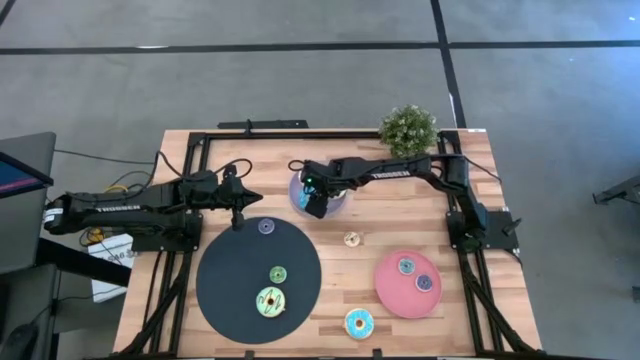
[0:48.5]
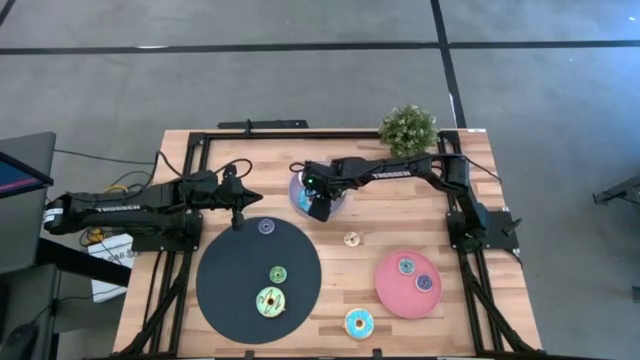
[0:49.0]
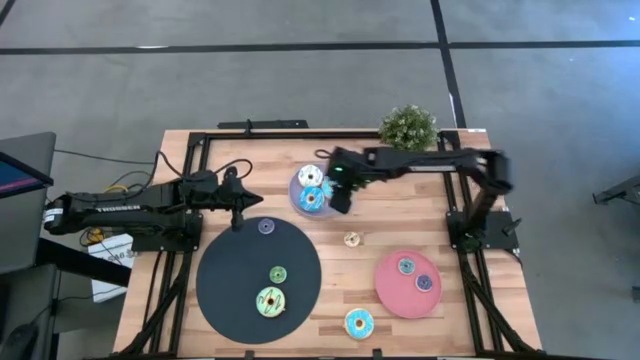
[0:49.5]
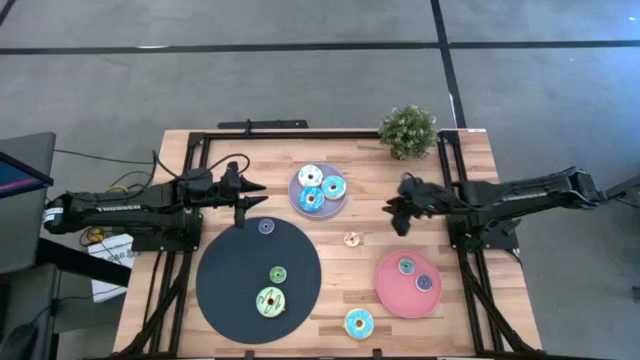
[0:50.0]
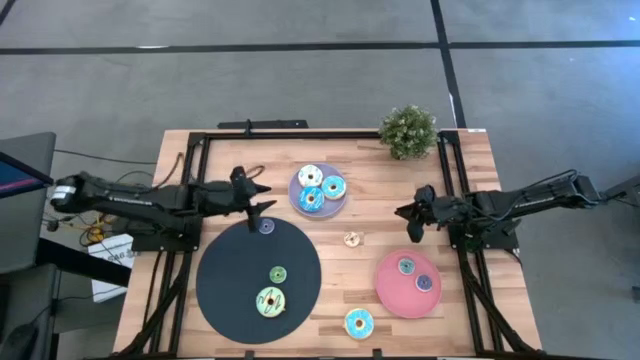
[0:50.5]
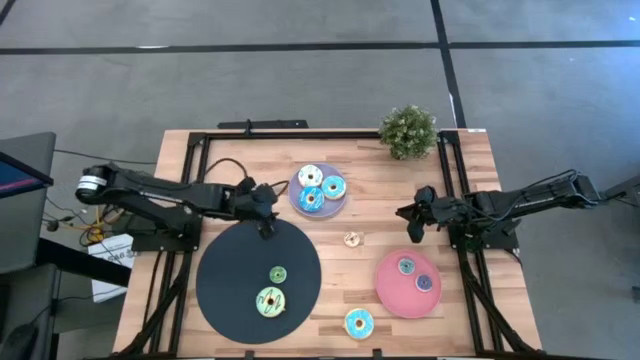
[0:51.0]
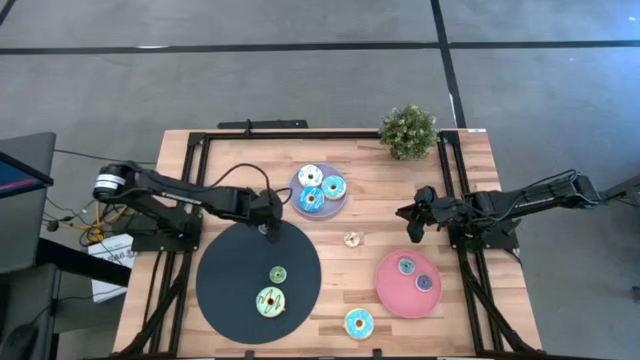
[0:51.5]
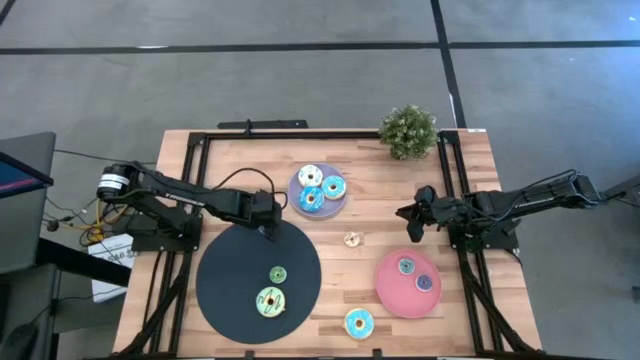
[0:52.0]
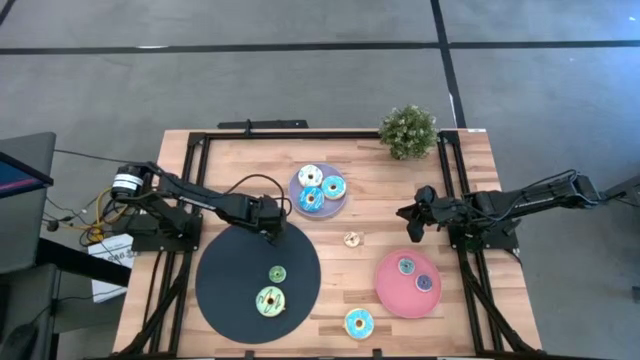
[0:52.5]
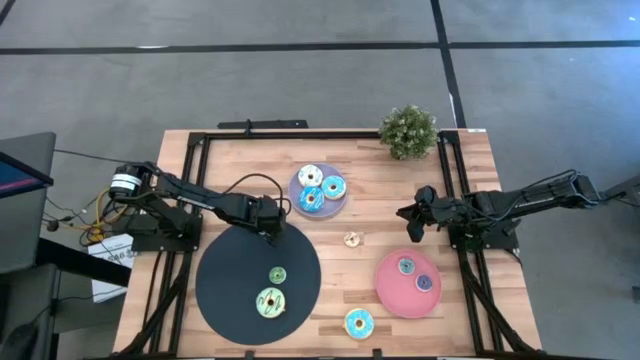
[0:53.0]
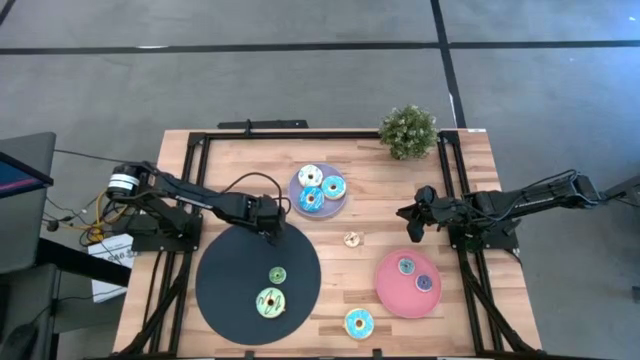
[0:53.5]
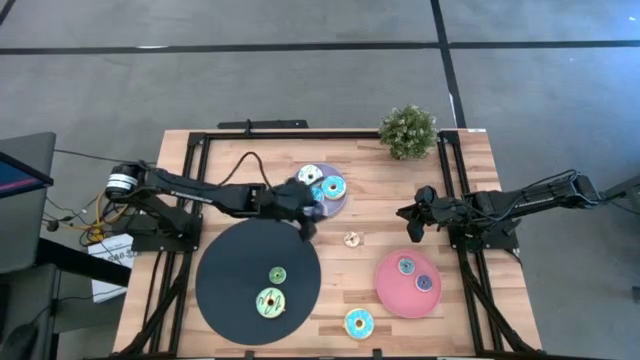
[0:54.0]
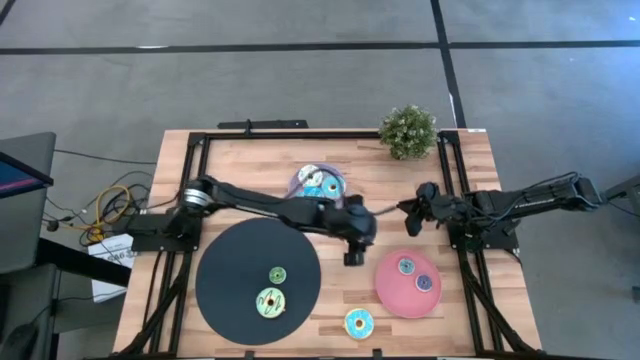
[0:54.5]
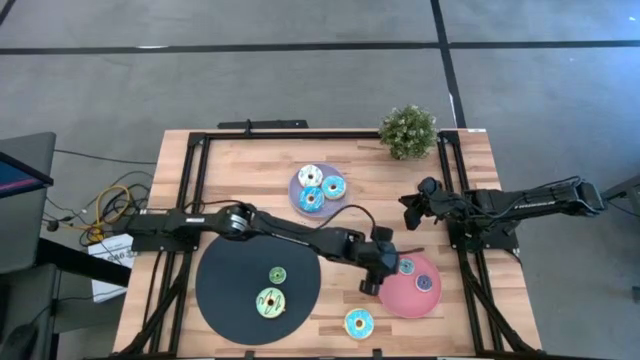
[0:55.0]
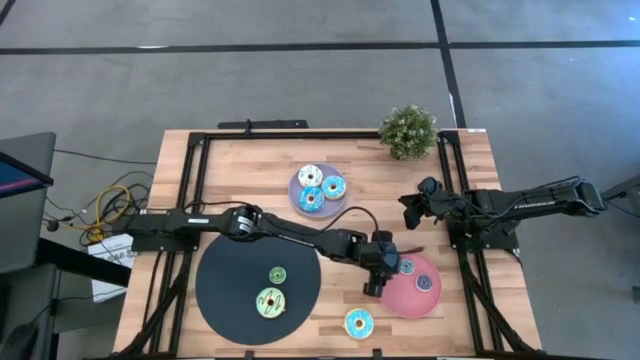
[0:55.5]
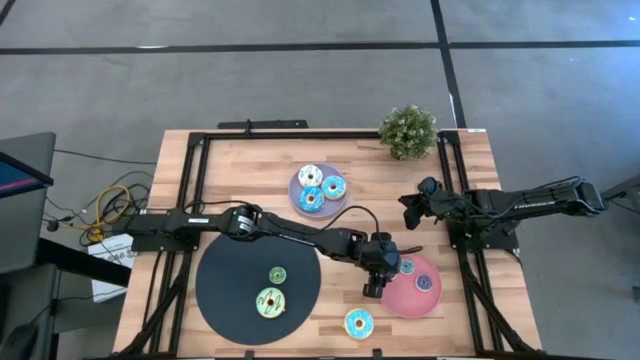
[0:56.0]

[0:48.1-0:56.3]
Task: Pick & Place donuts
Put the small blue donut on the pink plate

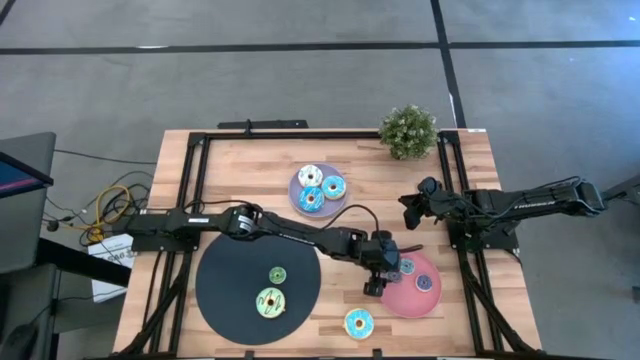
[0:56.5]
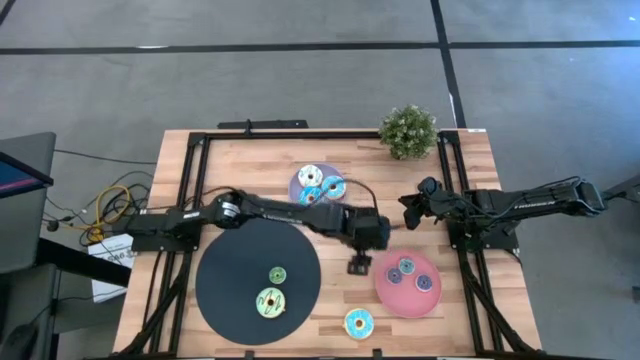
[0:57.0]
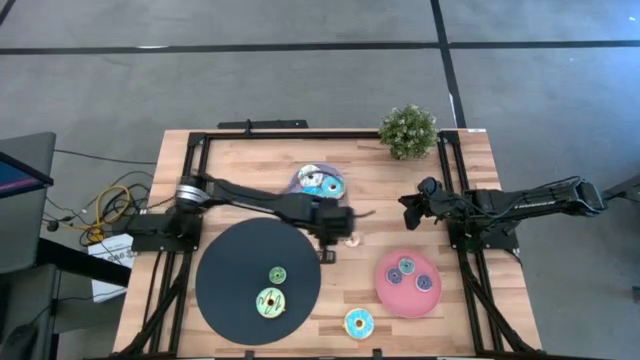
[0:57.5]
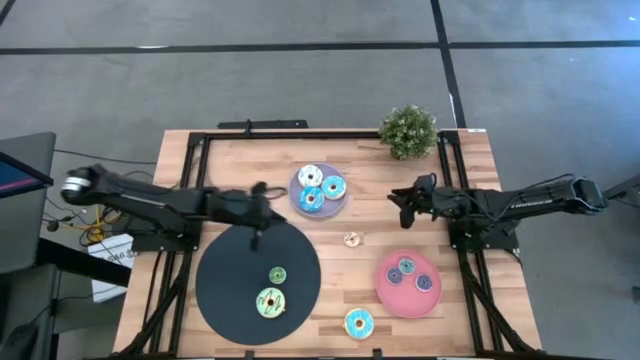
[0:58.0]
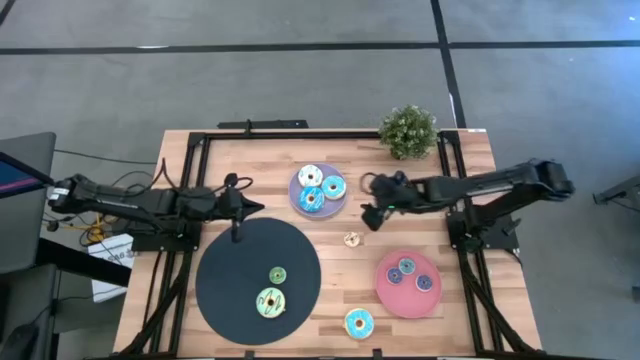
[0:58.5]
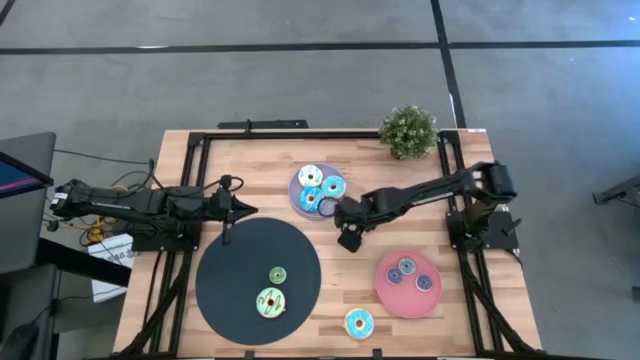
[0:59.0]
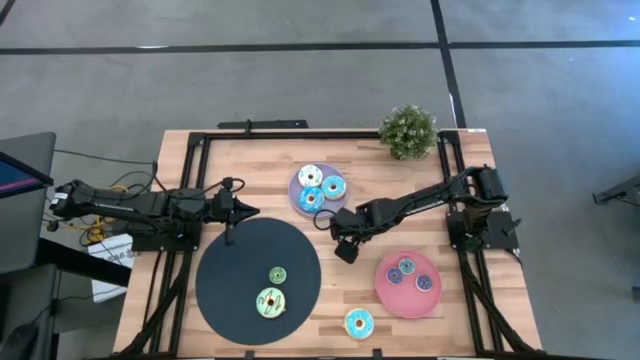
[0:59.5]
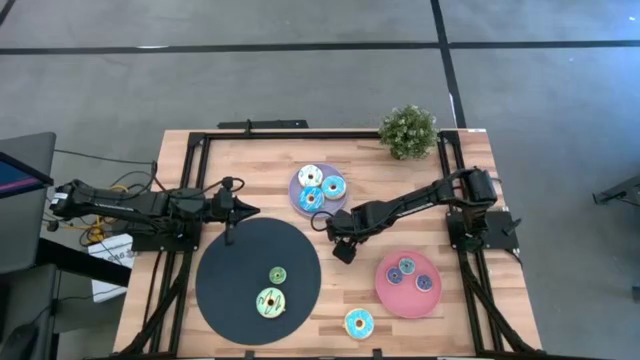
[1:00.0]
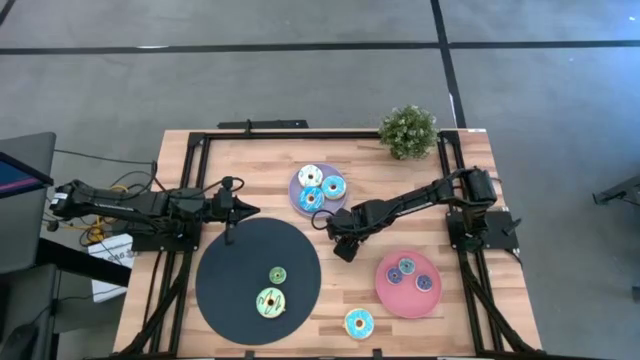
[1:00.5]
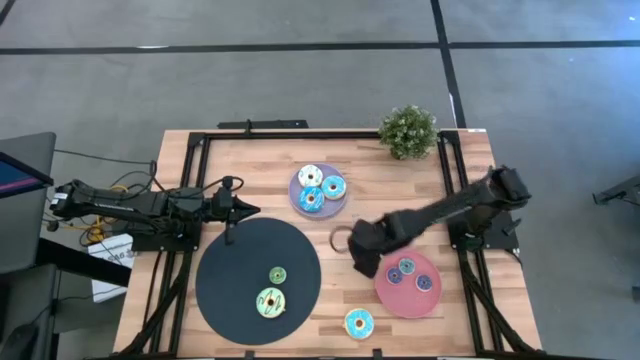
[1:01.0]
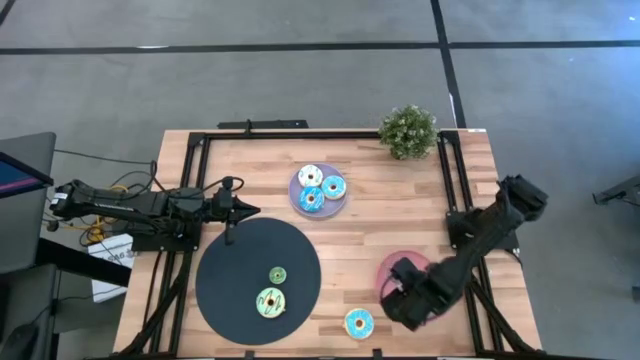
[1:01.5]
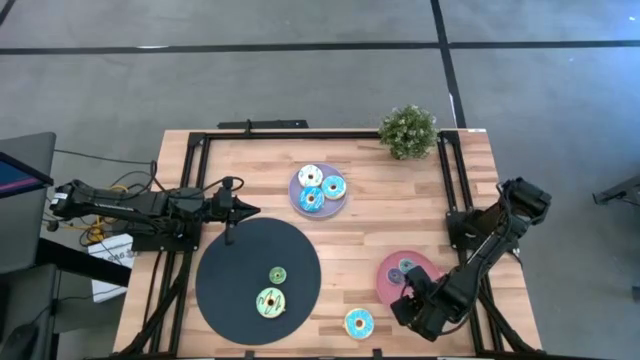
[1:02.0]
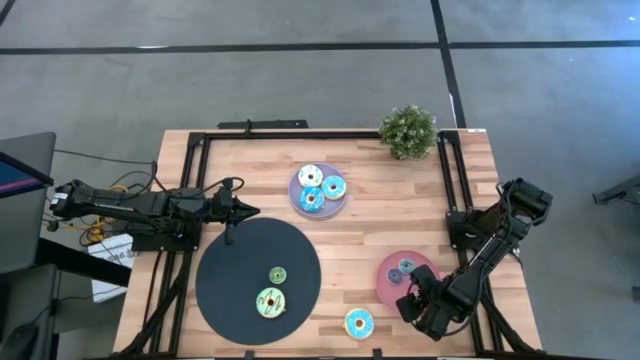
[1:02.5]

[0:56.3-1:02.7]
Put the small white donut on the pink plate

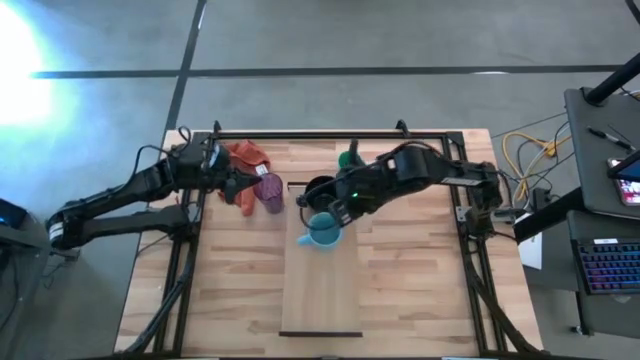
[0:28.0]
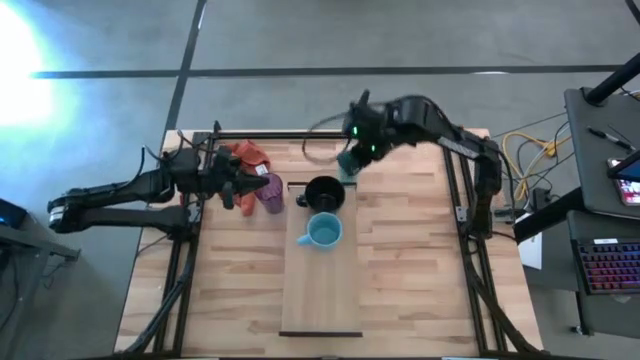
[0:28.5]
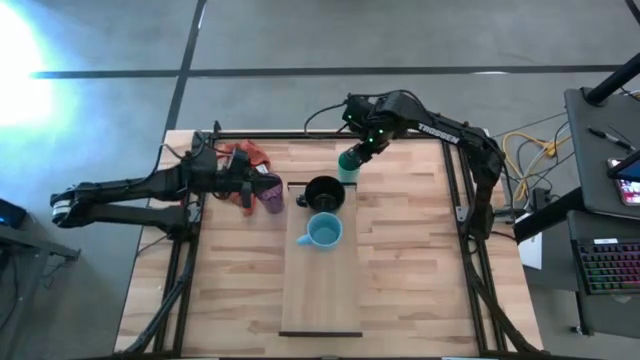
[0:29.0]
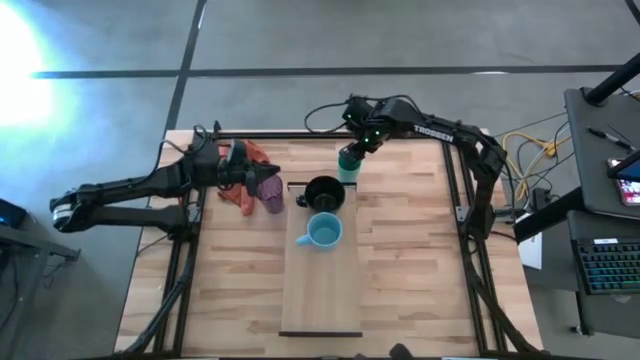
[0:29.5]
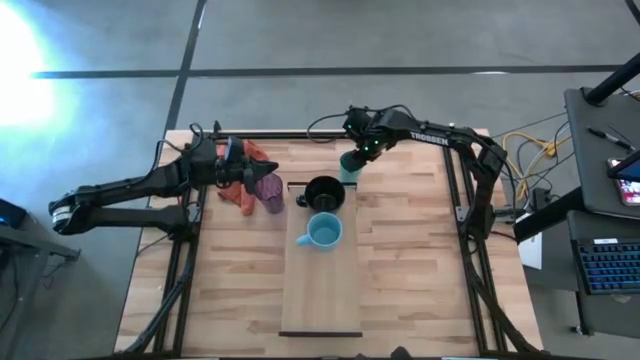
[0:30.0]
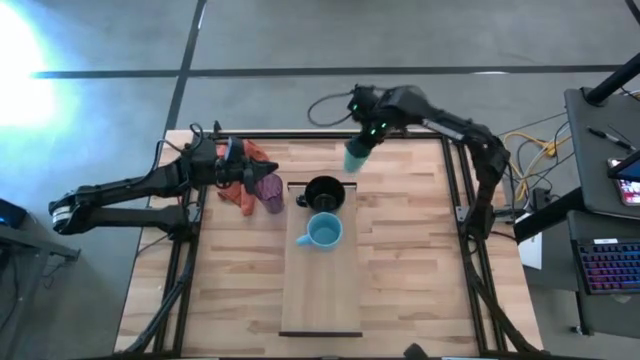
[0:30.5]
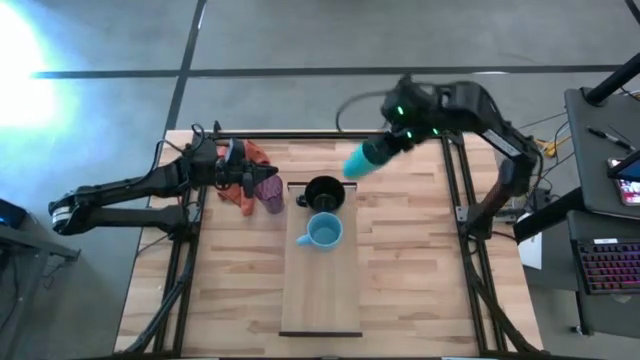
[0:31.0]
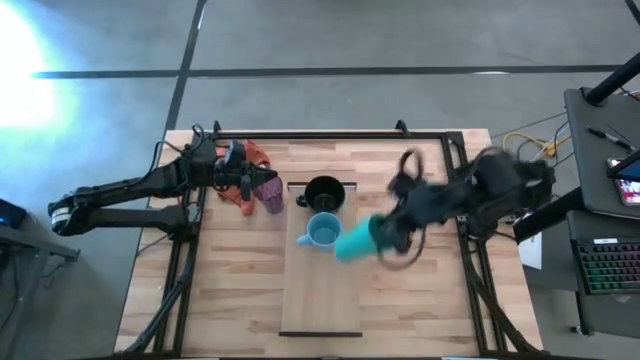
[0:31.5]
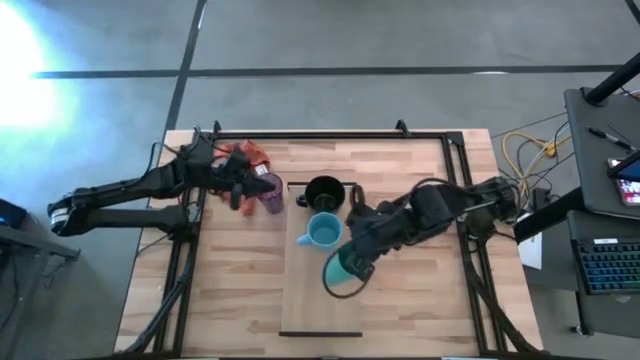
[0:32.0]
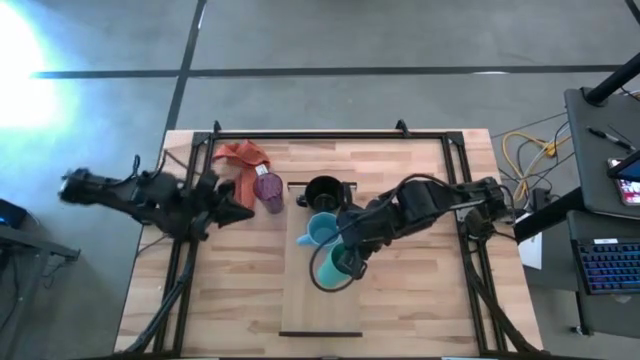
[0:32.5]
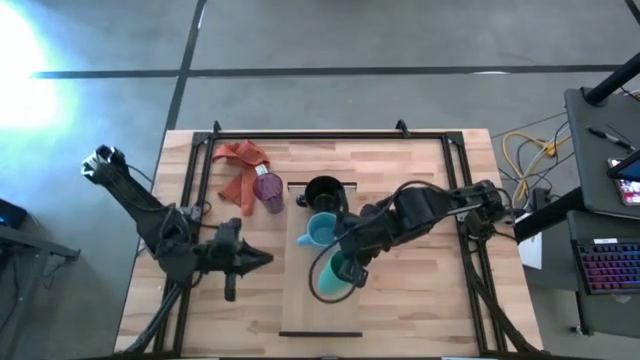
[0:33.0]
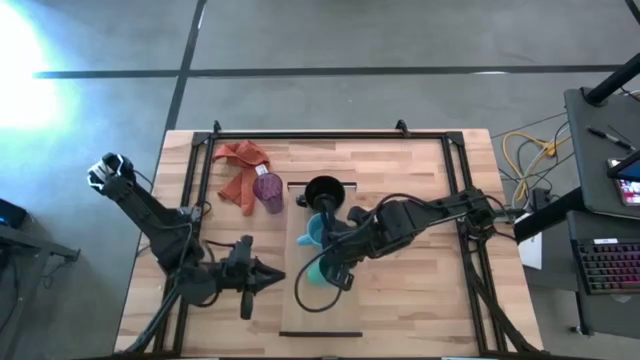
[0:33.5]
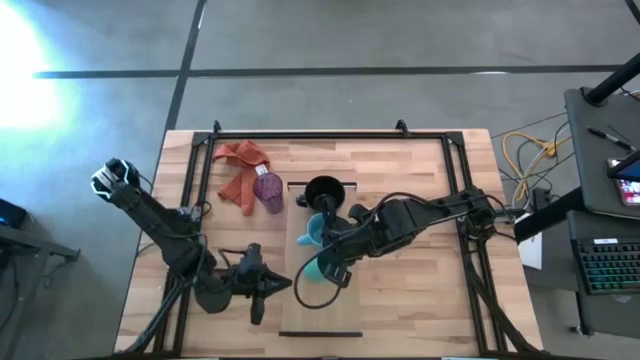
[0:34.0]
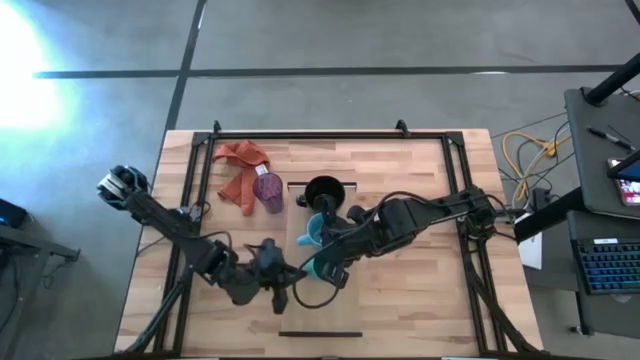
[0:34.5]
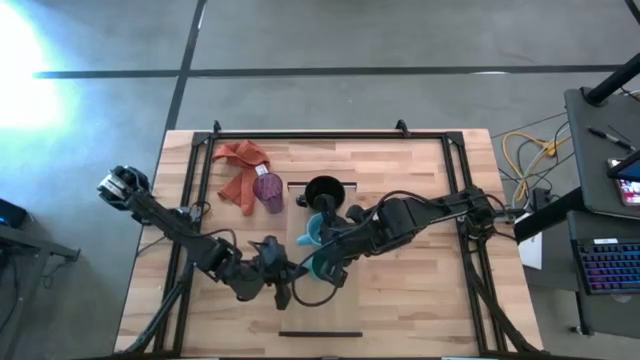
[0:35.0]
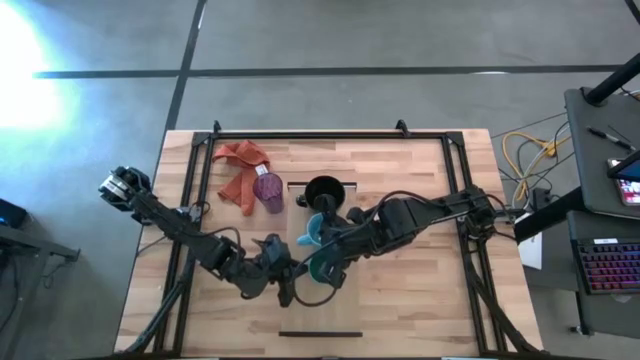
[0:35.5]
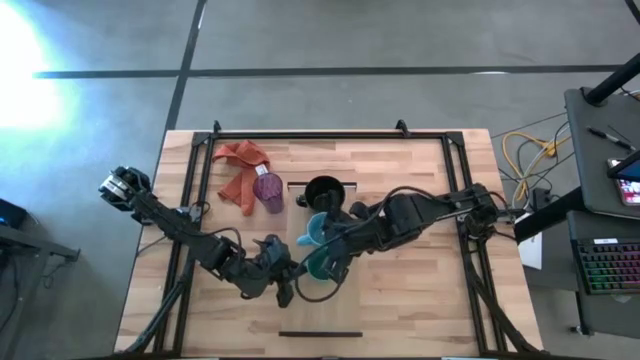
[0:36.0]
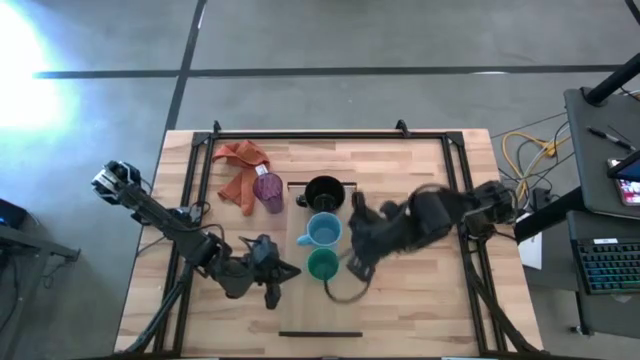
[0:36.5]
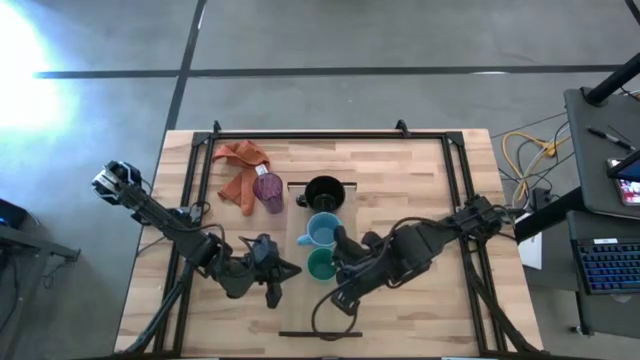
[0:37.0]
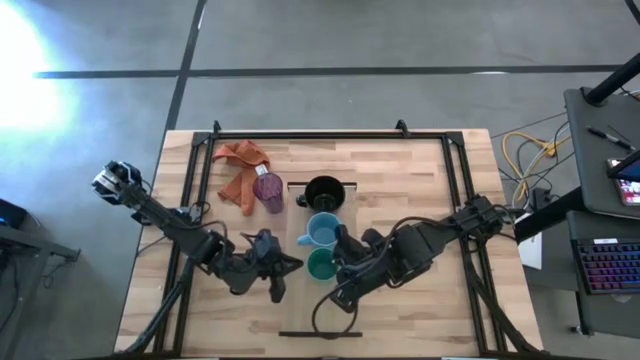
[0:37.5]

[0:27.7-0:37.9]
Task: Stack small to large cups/mugs on shelf
Put the green cup on the shelf
